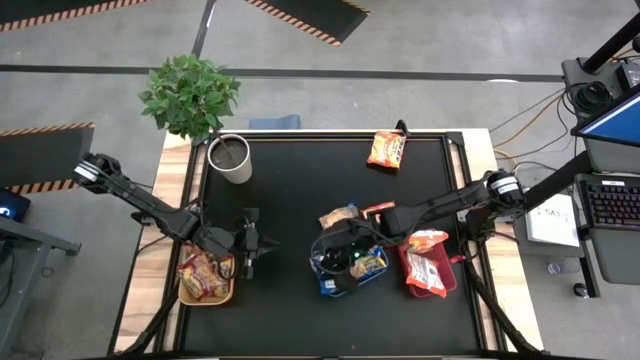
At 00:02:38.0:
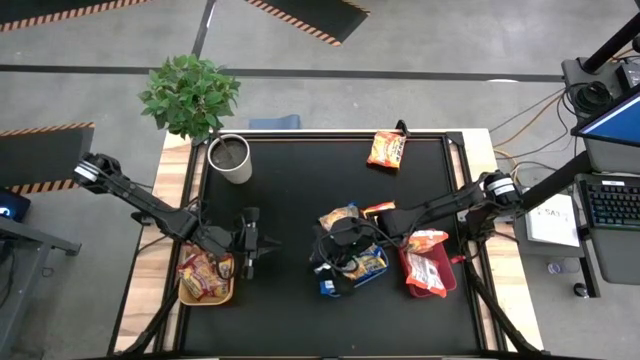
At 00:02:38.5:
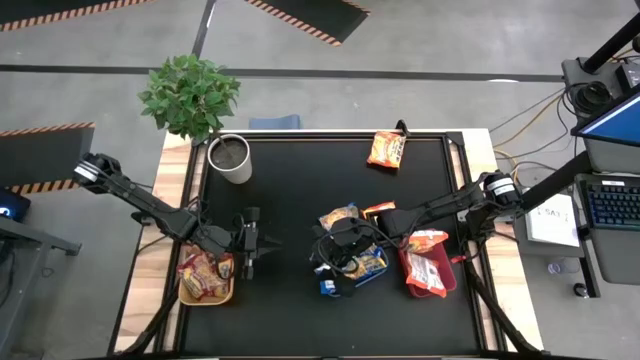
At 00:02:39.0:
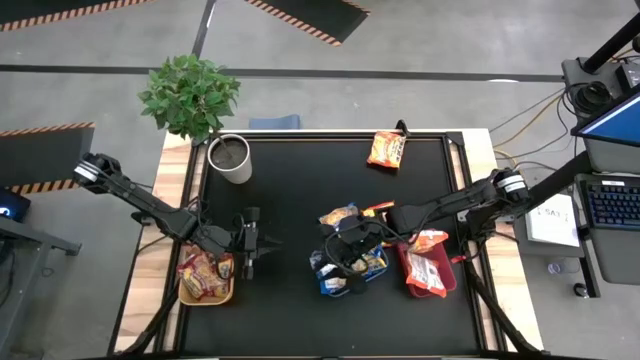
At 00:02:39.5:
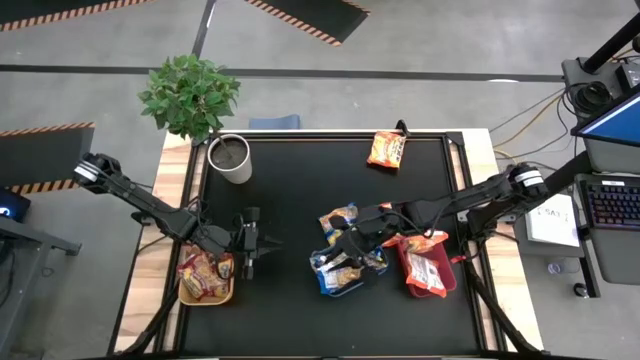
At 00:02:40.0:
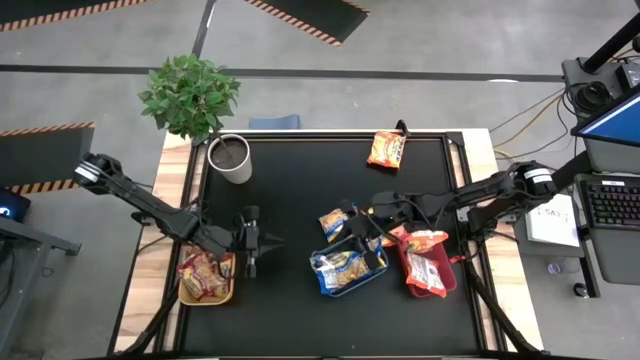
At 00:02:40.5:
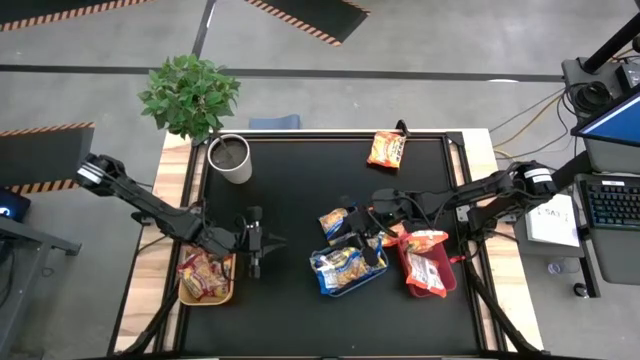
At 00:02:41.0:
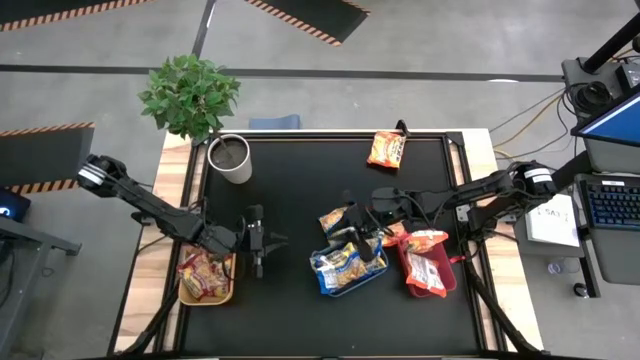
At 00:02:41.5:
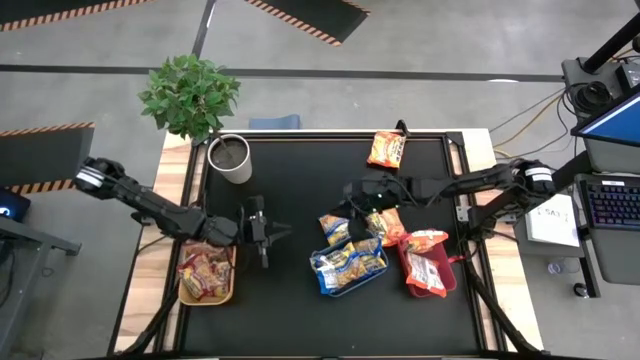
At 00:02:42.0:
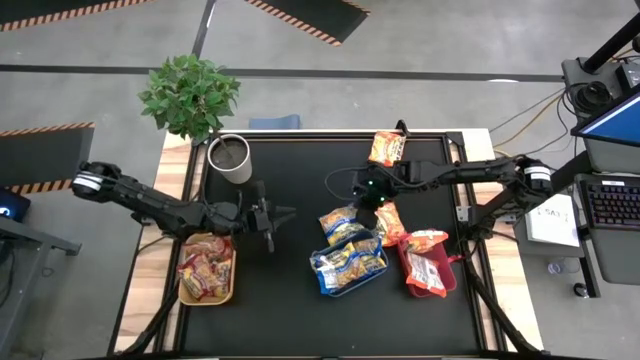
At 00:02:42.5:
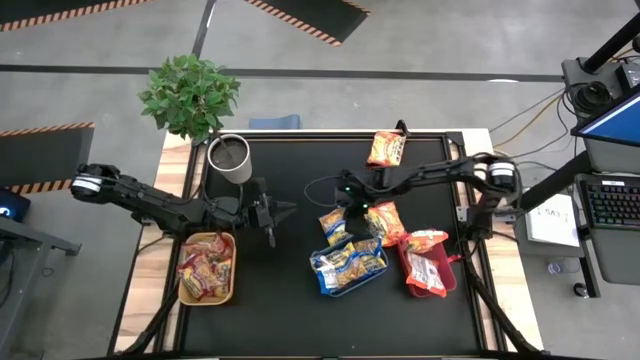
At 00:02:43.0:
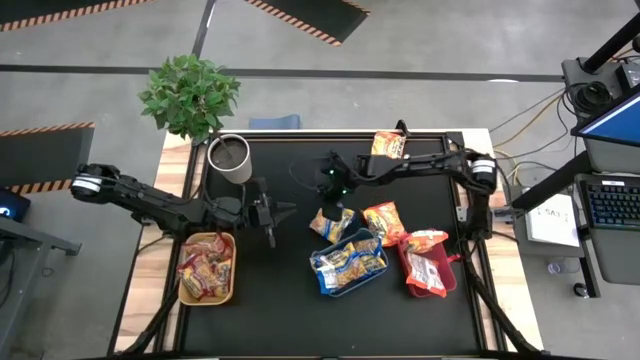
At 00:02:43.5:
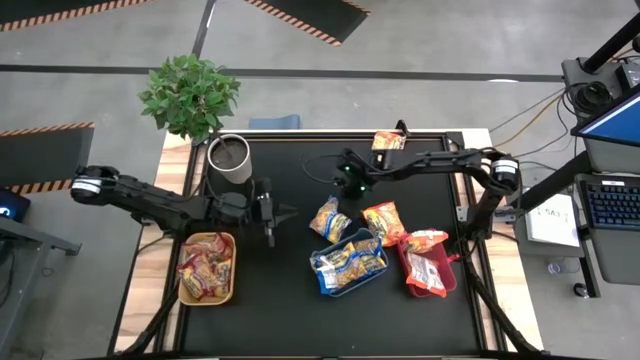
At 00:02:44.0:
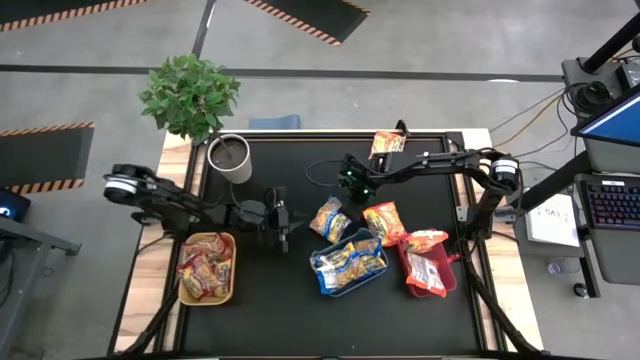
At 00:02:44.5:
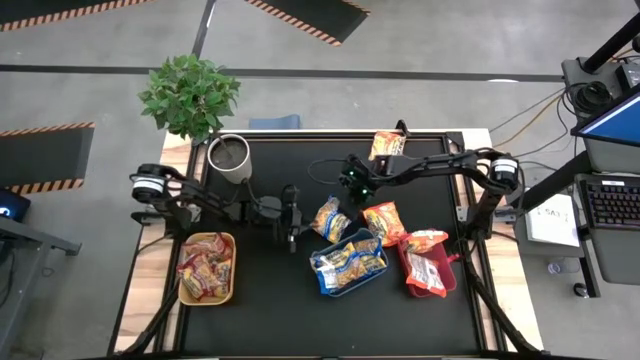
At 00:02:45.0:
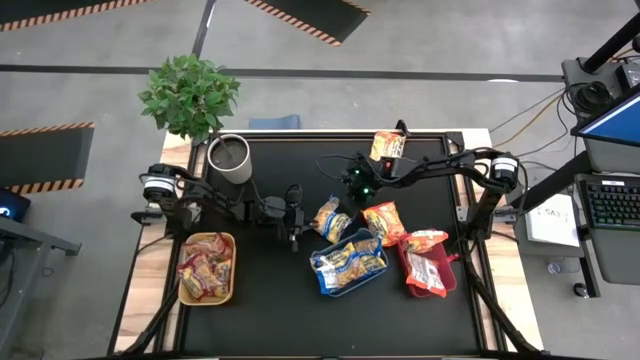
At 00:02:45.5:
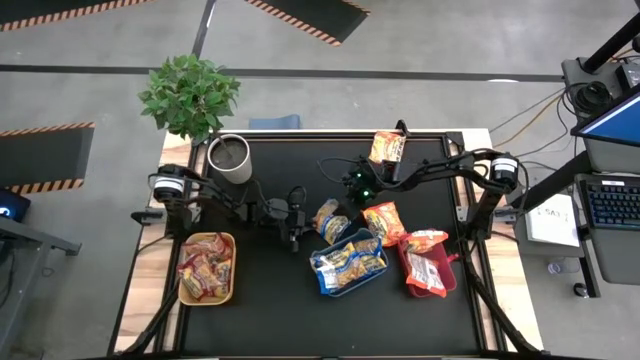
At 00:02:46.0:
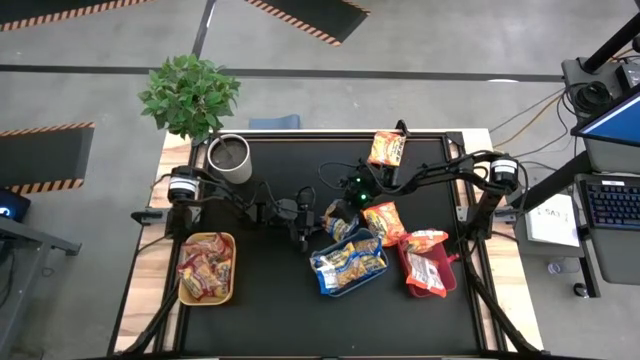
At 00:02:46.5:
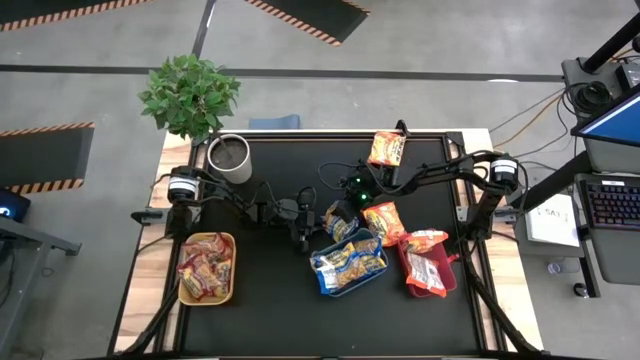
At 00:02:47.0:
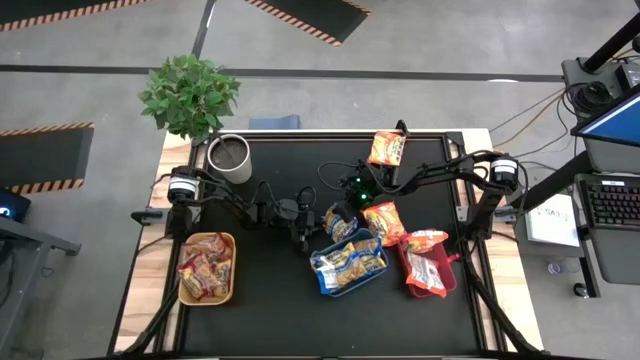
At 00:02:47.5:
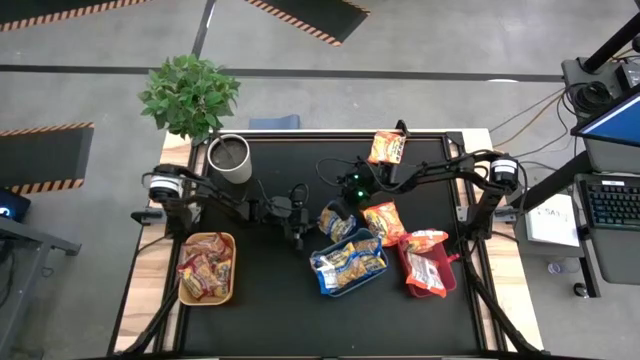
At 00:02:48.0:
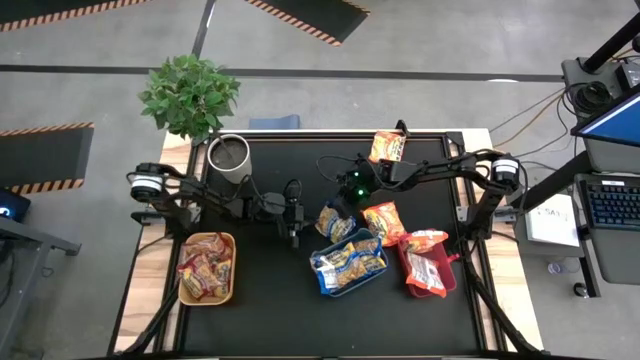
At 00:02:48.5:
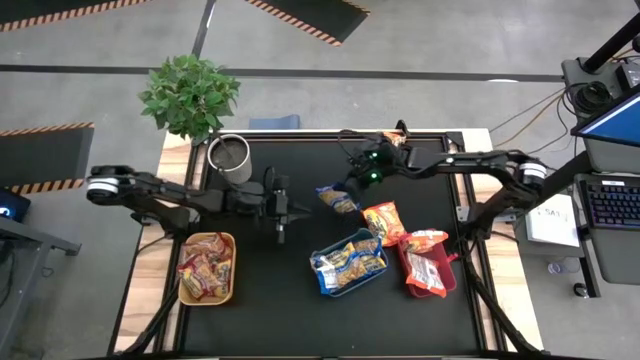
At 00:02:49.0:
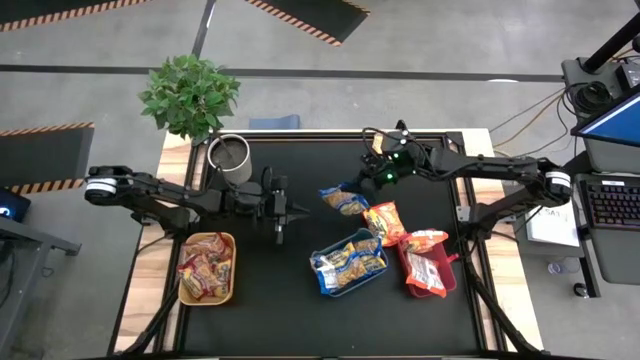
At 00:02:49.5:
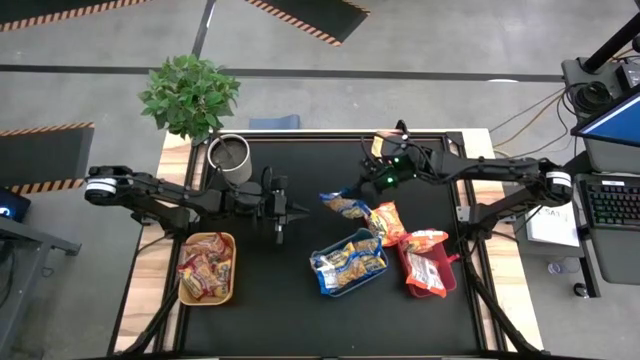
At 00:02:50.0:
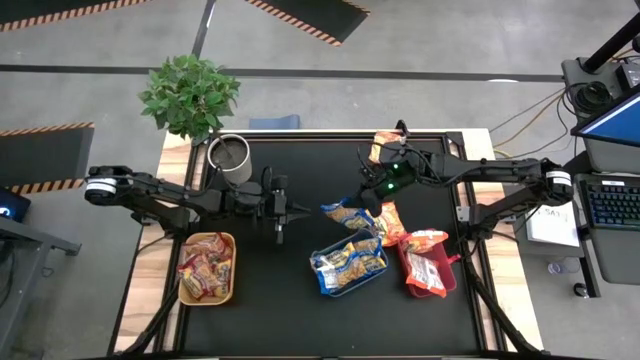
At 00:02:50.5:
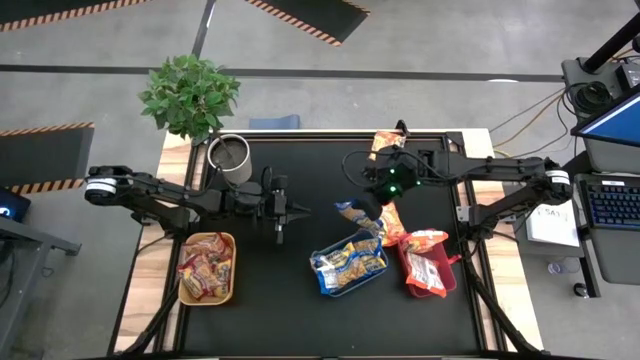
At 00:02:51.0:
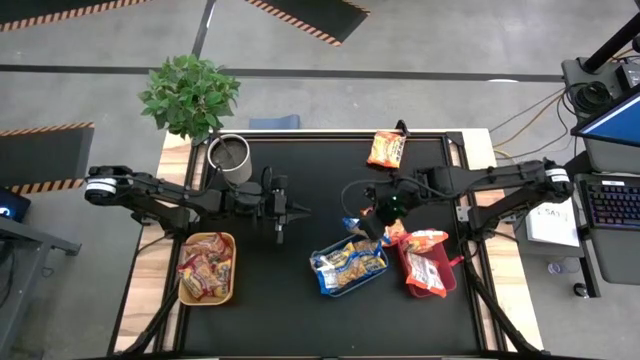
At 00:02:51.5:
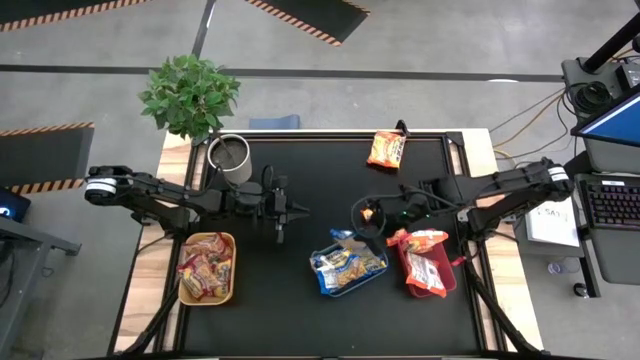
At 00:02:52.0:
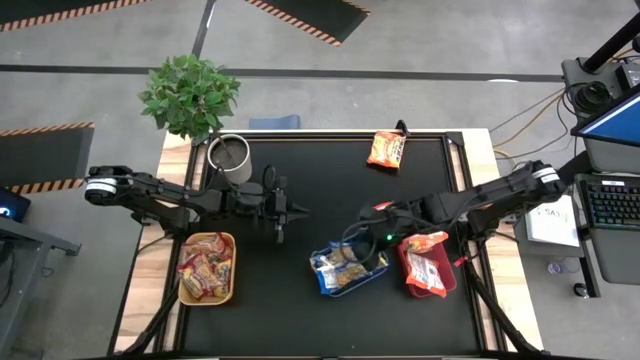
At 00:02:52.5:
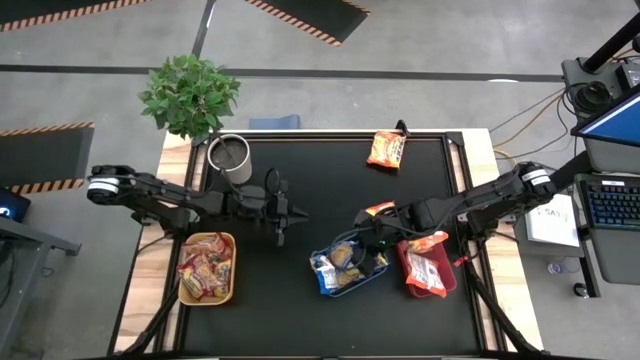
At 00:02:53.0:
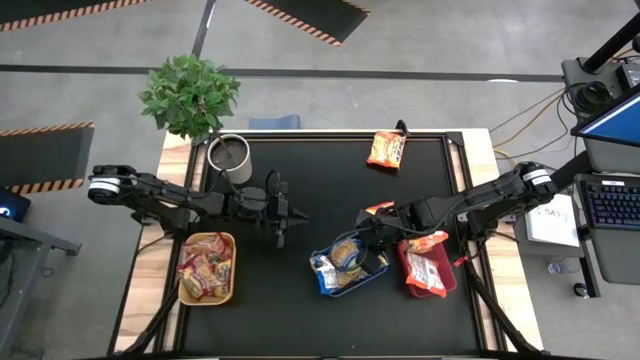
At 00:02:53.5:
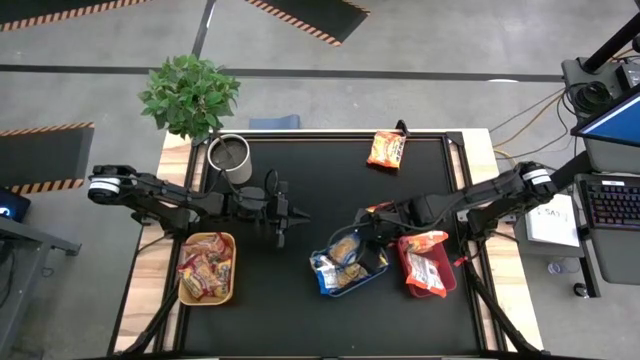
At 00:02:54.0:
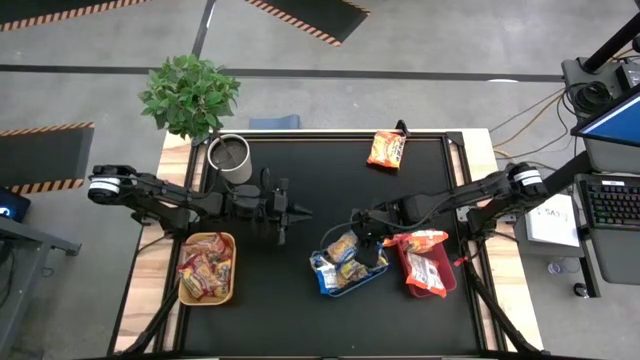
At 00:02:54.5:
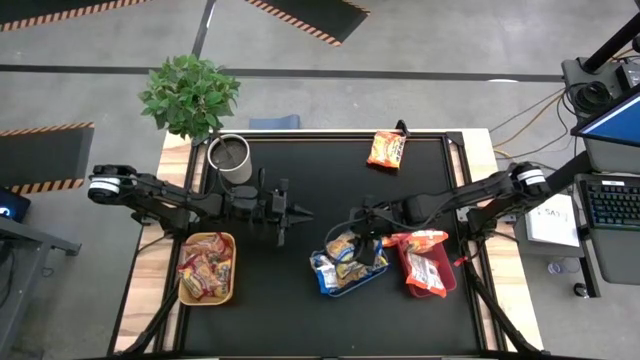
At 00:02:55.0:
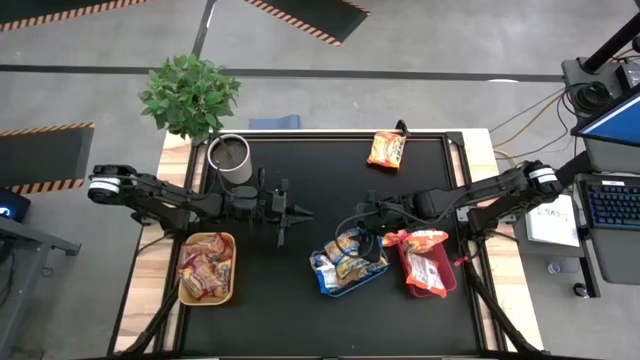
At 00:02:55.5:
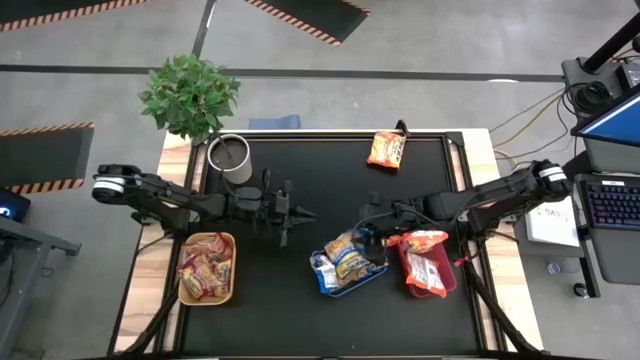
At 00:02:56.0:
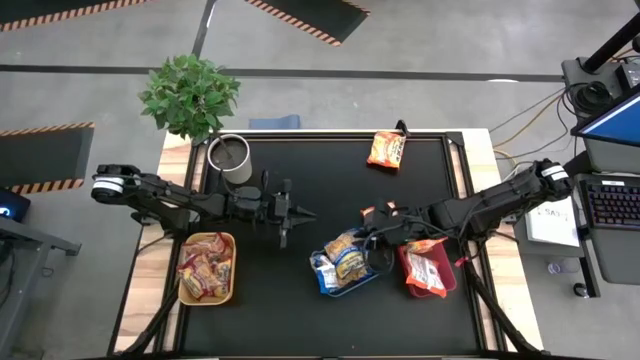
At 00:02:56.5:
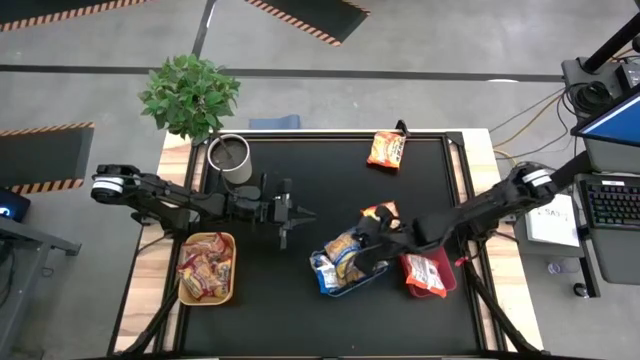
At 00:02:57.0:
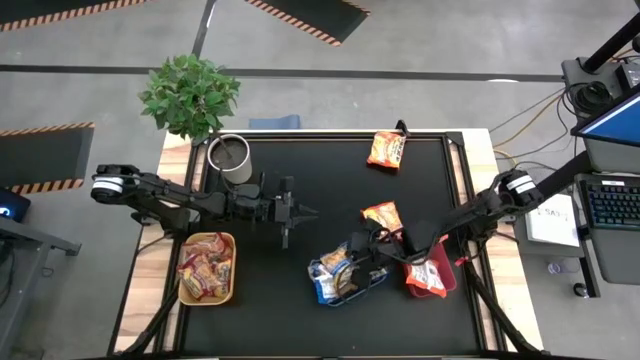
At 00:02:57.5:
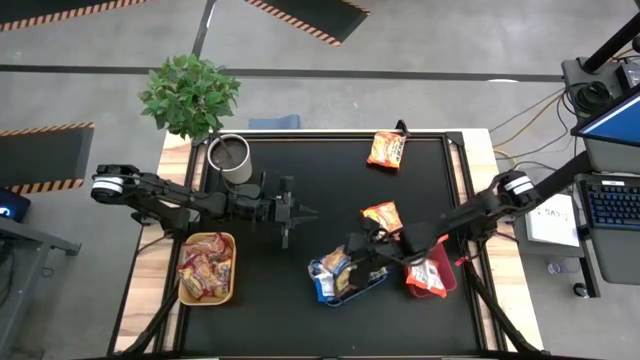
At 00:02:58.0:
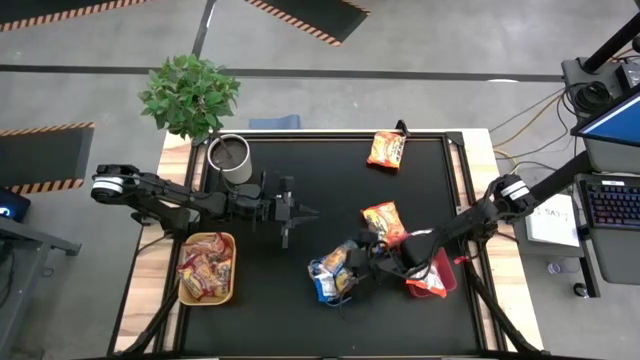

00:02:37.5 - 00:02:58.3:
Task: Sort Maruchan noodles
Put the blue noodle pack into the blue bin
